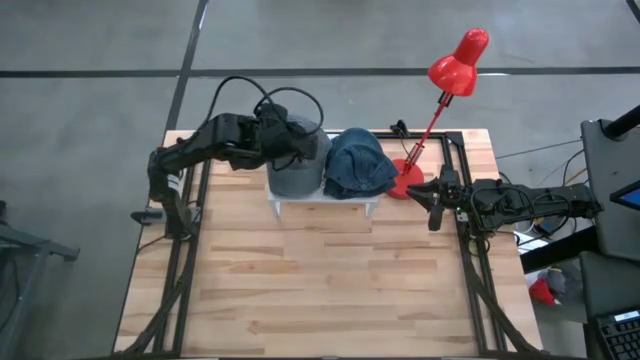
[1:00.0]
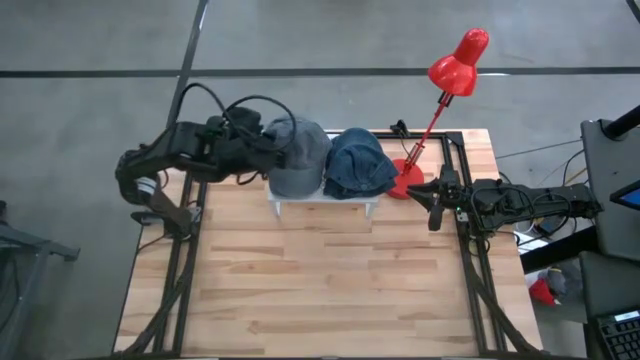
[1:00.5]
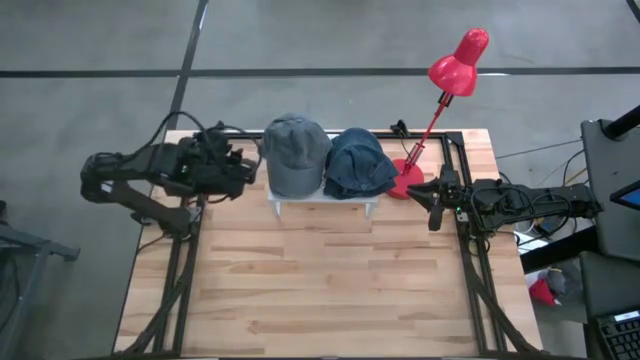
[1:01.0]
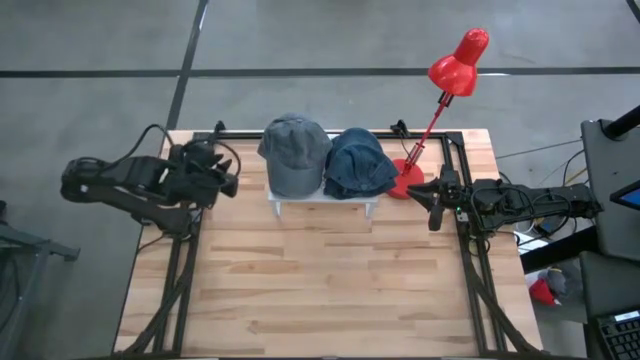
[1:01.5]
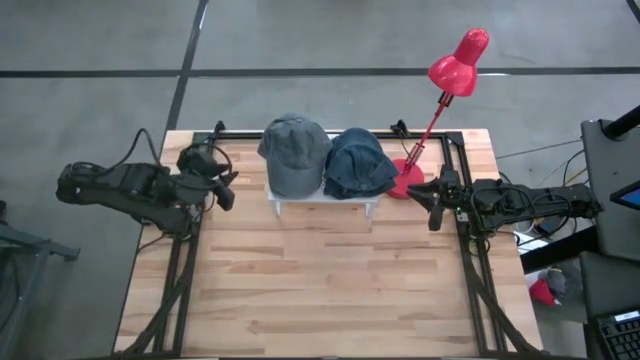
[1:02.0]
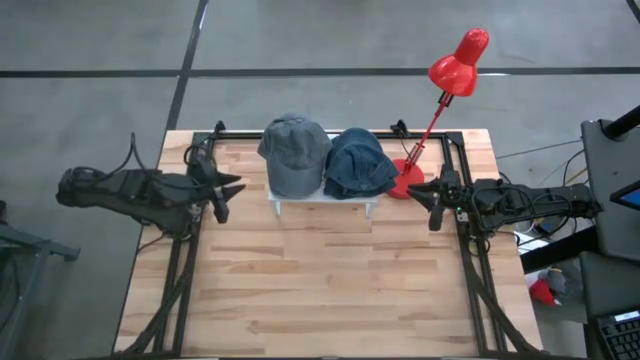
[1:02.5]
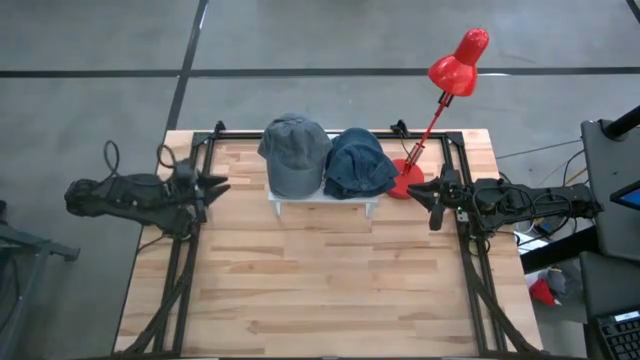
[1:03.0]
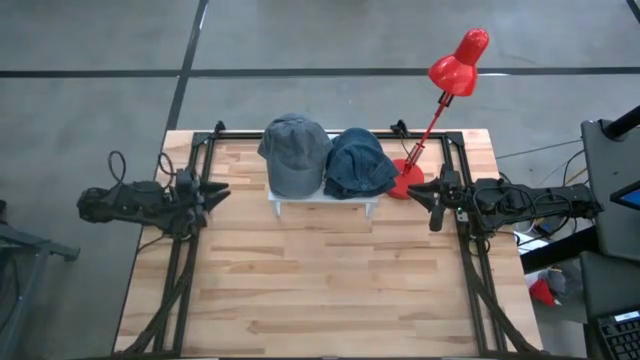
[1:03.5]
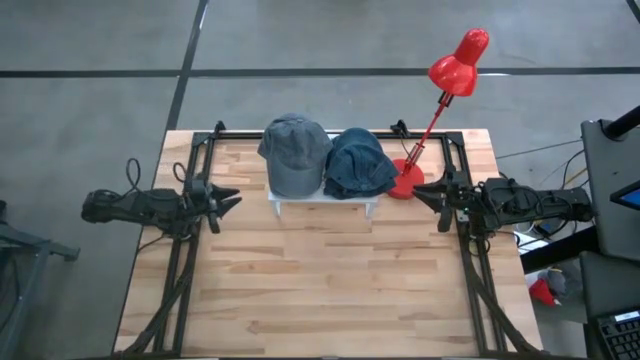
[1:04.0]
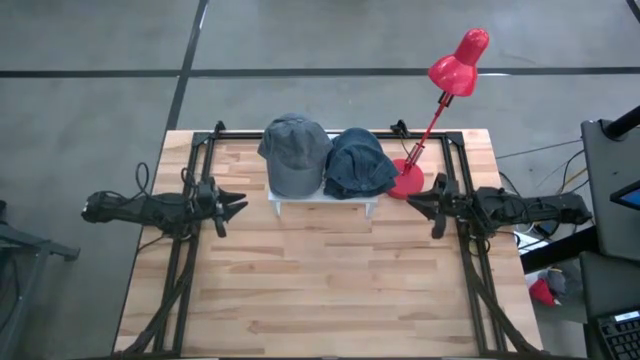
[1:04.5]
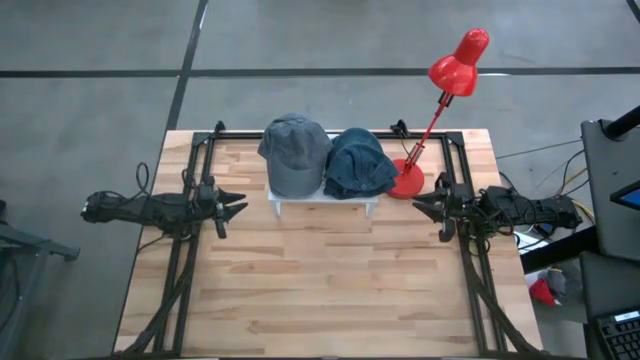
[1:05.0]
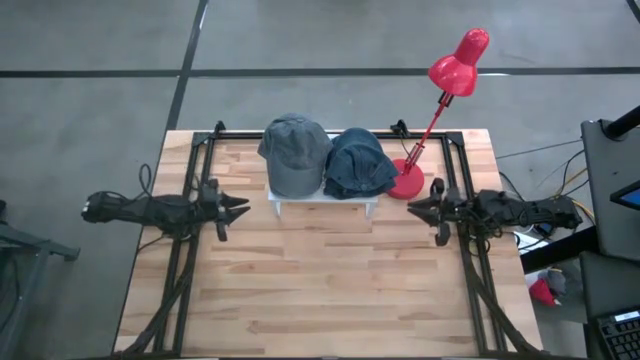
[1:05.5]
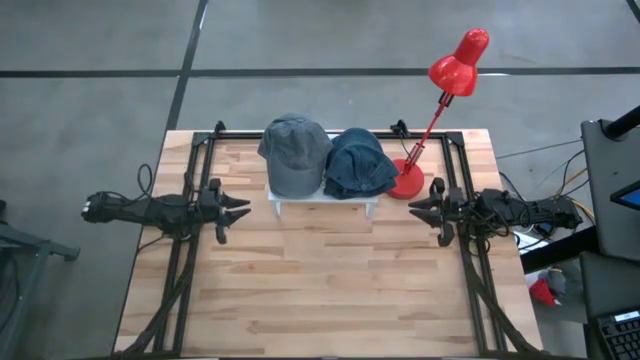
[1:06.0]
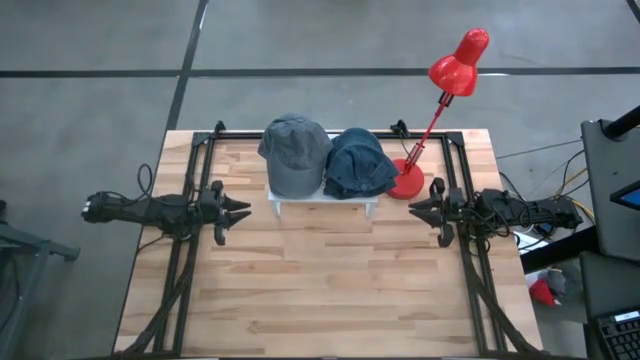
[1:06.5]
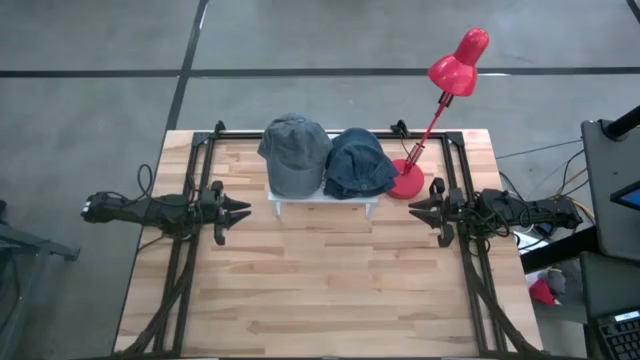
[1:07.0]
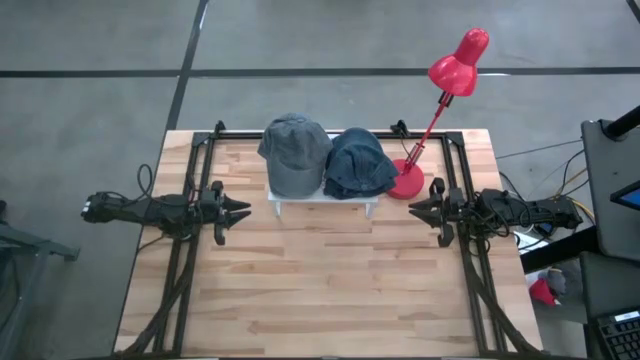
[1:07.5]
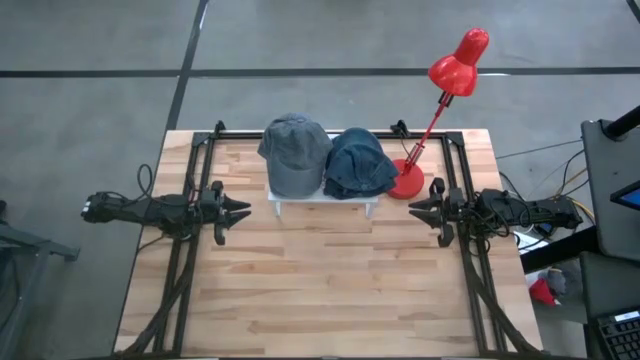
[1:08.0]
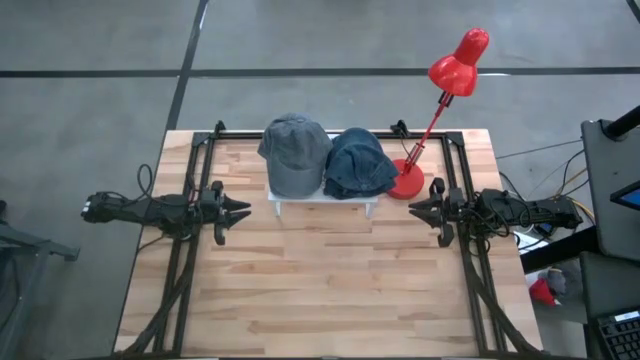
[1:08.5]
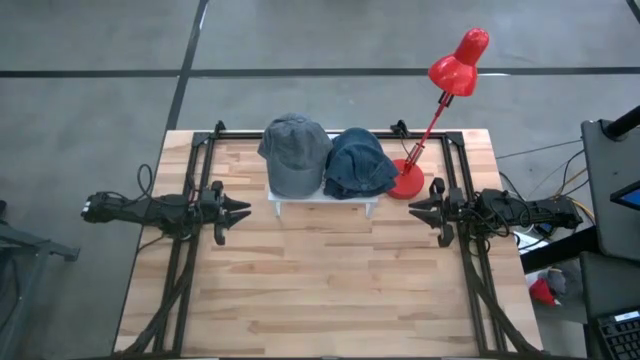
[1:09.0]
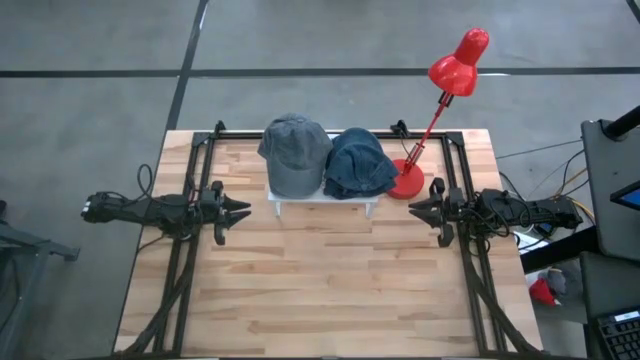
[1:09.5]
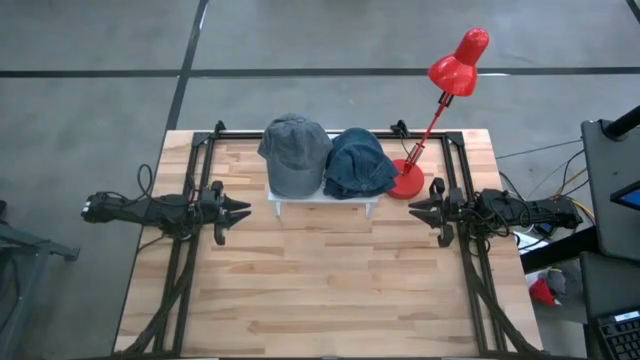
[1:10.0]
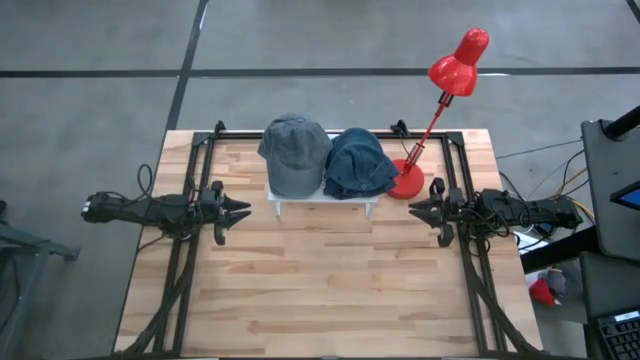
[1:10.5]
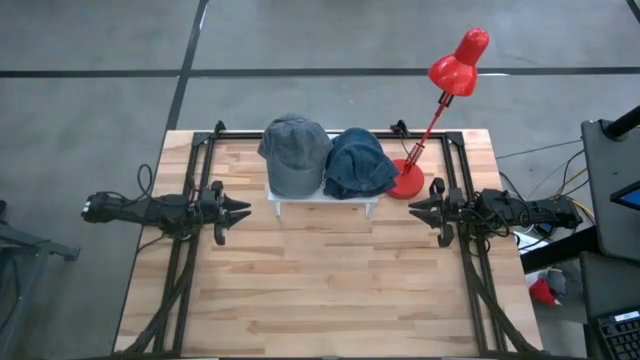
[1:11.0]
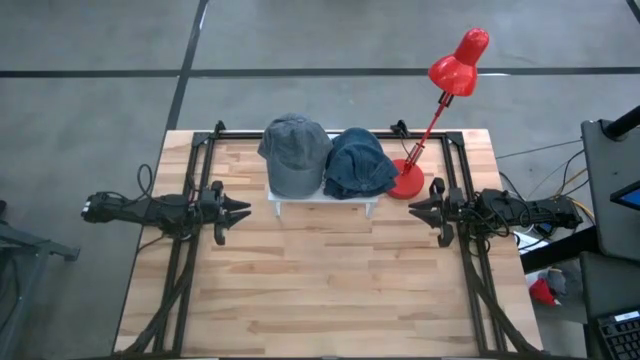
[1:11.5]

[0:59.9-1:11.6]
Task: Pick & Place hat
Return to Home Position

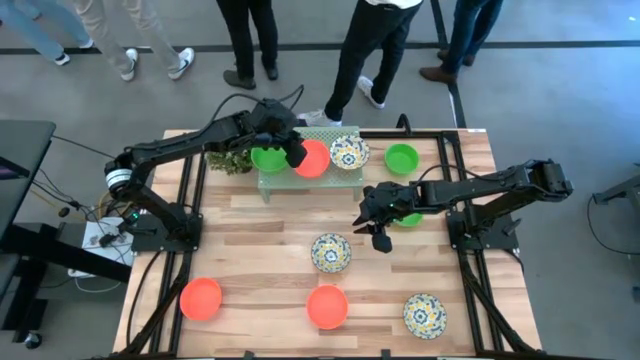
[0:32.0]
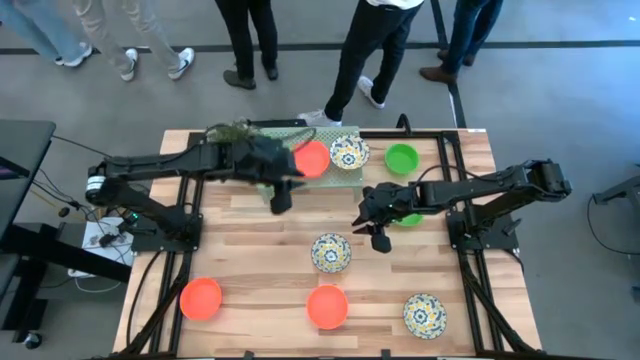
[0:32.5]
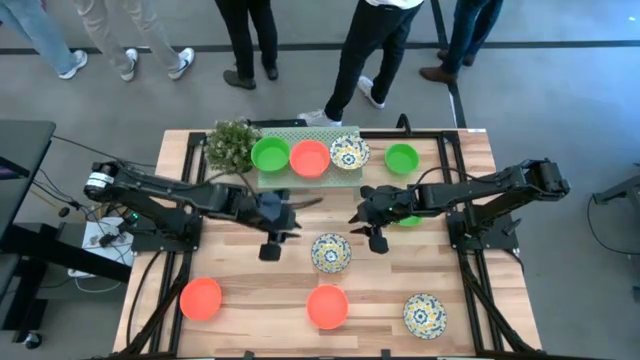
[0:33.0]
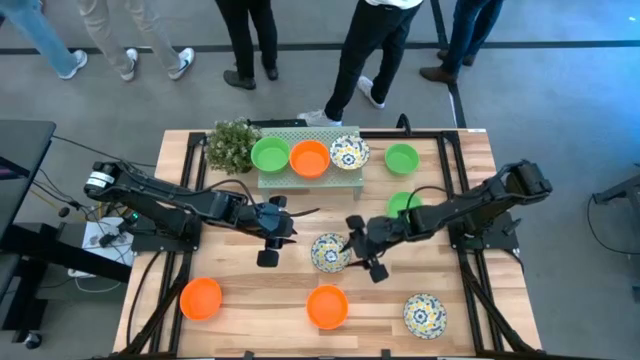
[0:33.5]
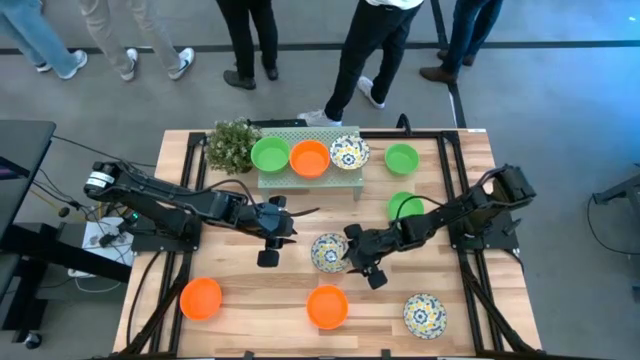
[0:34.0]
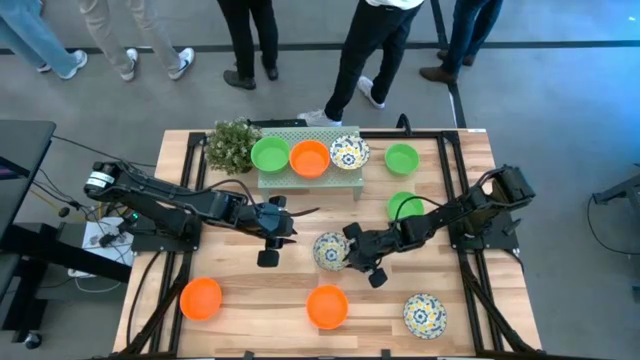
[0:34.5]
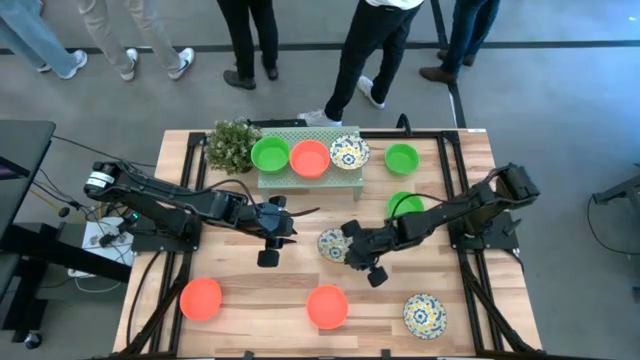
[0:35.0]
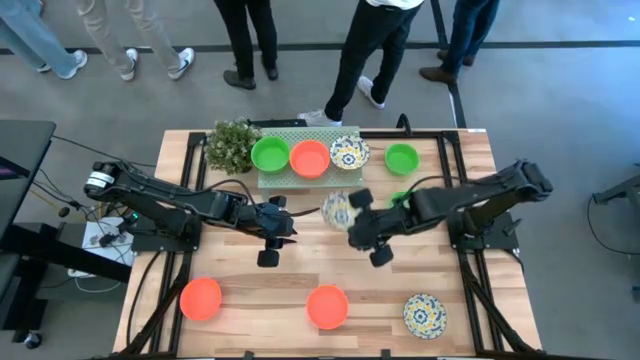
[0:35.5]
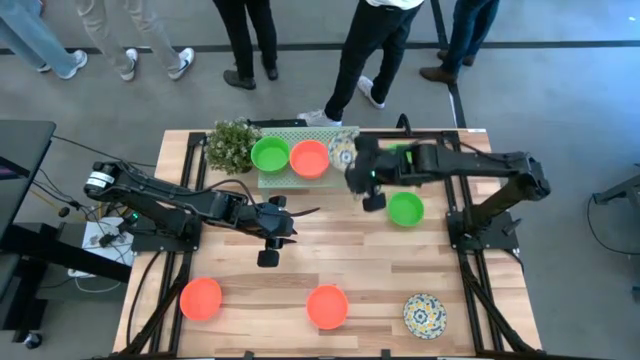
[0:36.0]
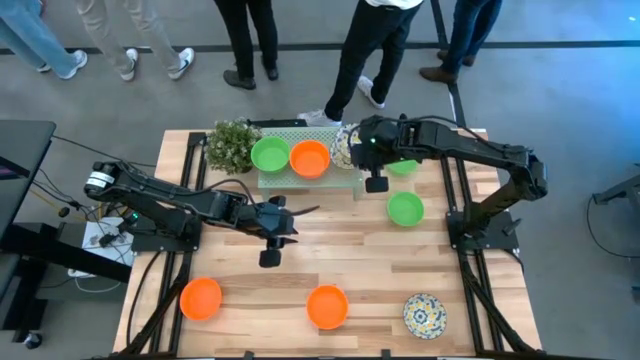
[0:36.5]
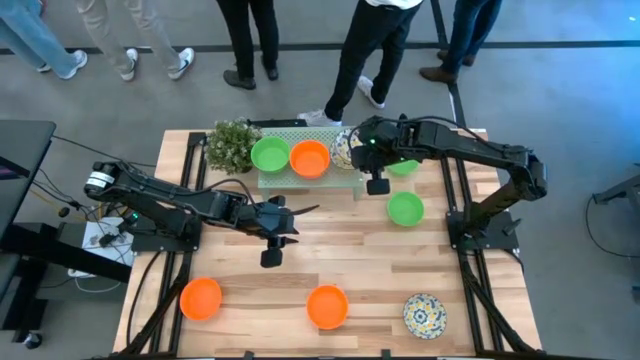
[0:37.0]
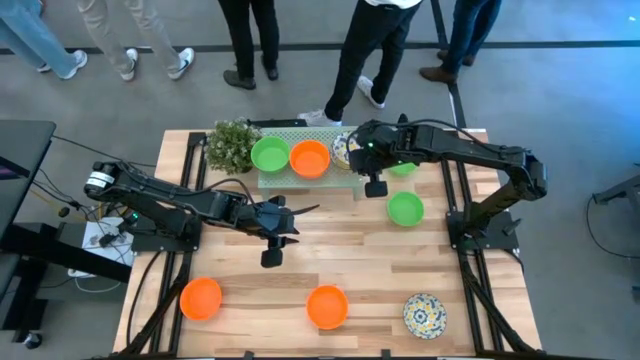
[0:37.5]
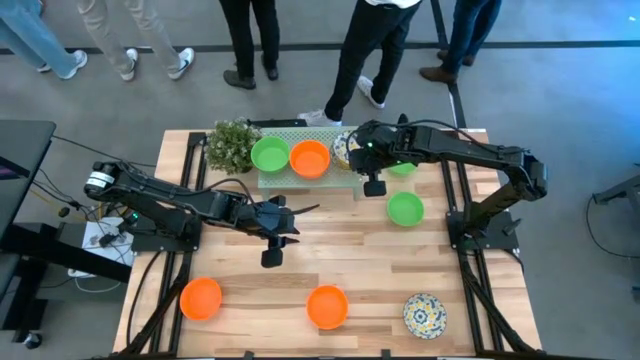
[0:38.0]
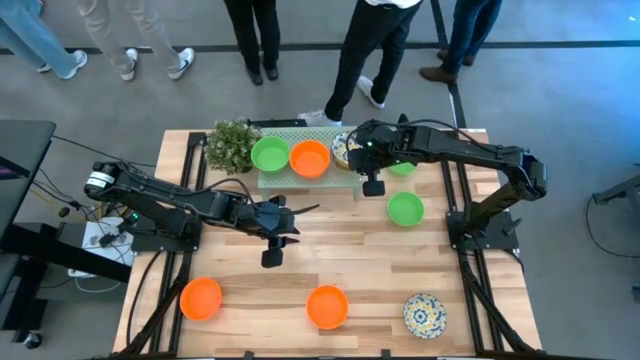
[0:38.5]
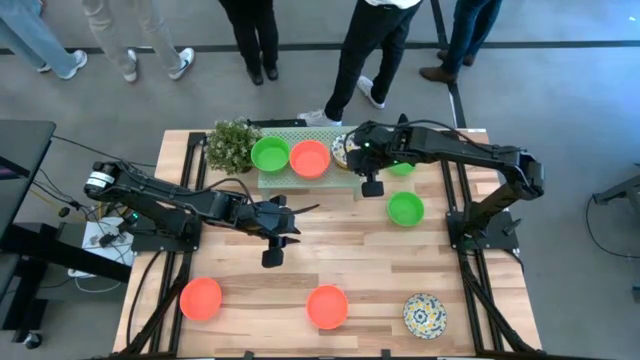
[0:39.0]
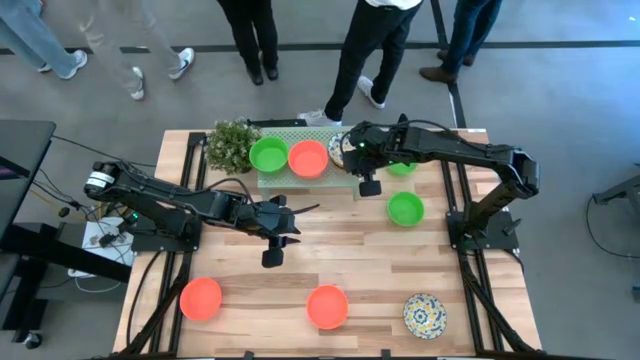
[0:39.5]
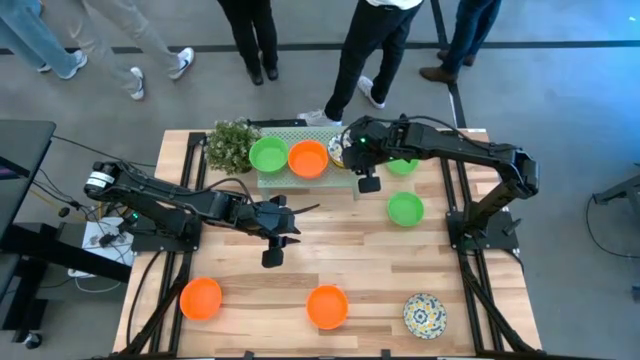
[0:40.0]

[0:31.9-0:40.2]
Task: Pick & Place Mini bowls
Stack the yellow bowl on top of the yellow bowl on the shelf
